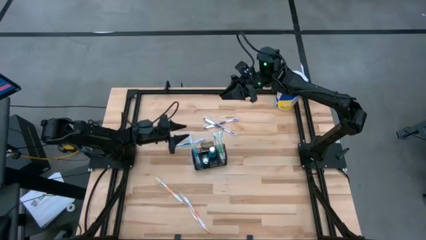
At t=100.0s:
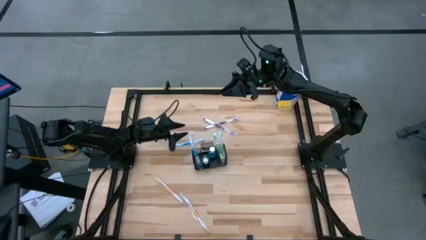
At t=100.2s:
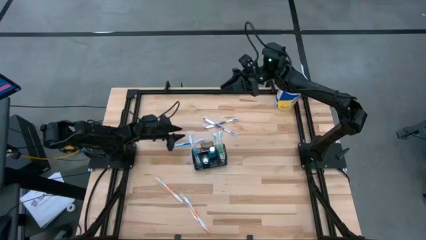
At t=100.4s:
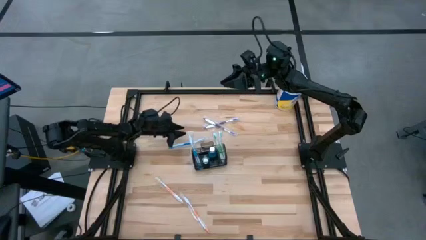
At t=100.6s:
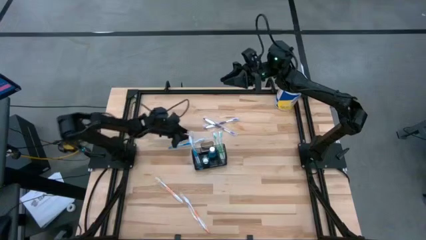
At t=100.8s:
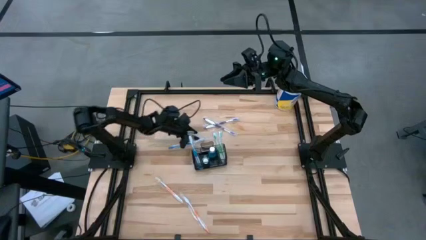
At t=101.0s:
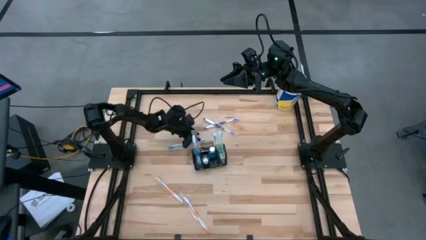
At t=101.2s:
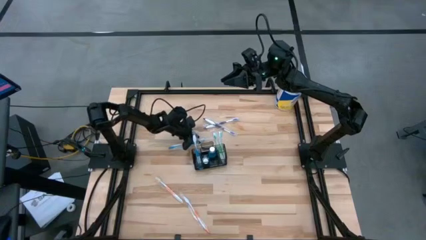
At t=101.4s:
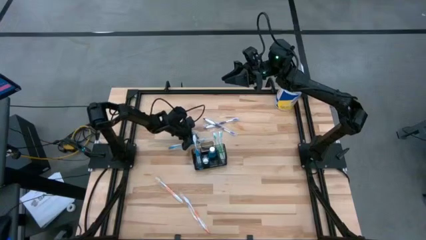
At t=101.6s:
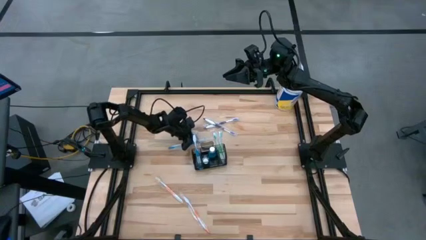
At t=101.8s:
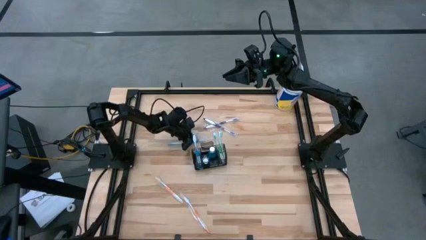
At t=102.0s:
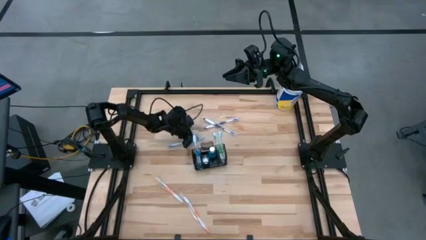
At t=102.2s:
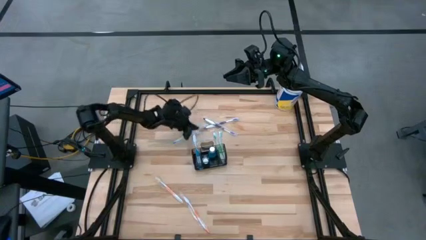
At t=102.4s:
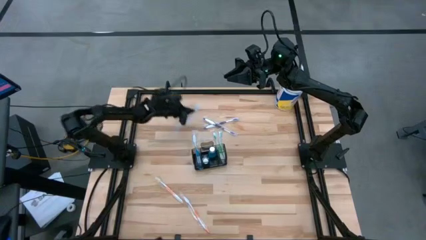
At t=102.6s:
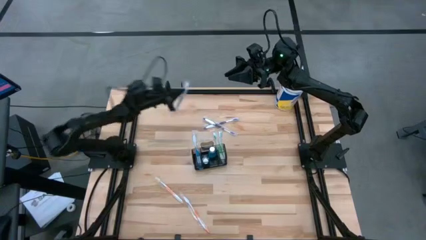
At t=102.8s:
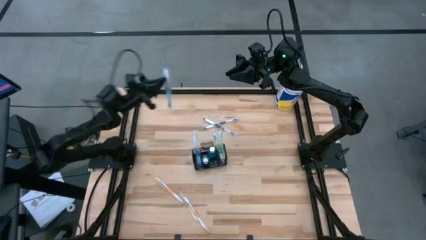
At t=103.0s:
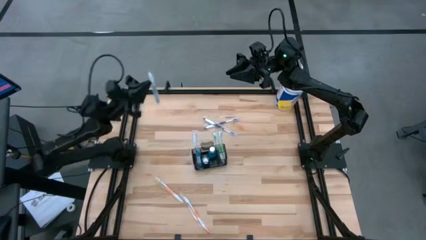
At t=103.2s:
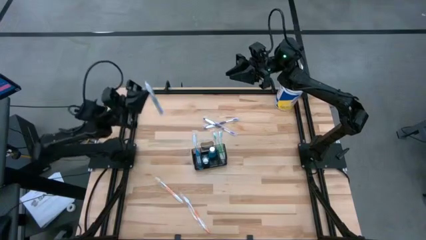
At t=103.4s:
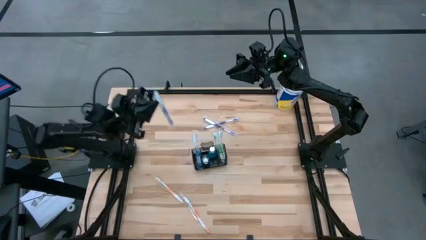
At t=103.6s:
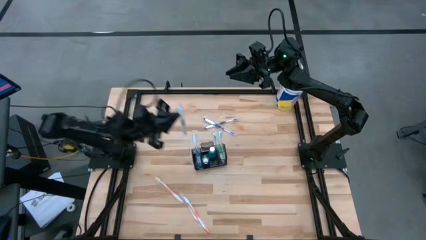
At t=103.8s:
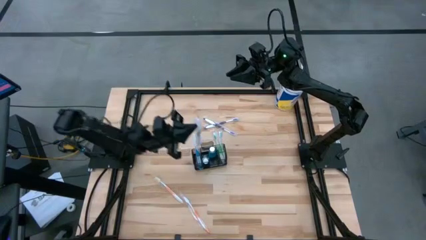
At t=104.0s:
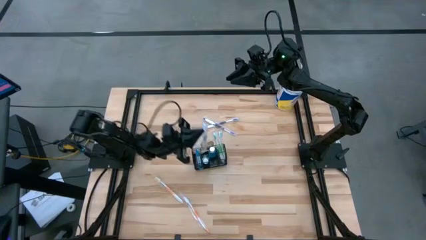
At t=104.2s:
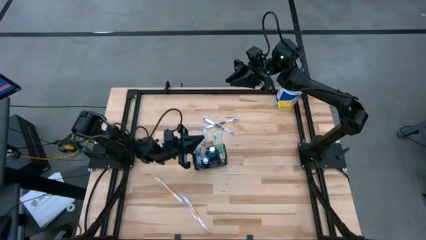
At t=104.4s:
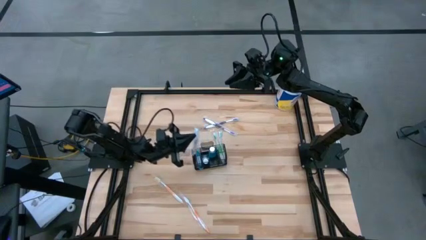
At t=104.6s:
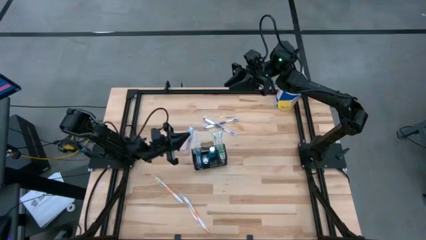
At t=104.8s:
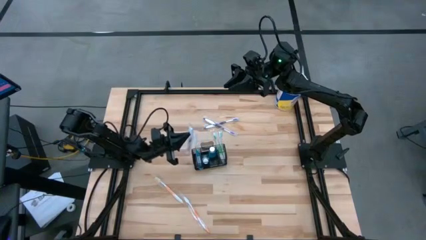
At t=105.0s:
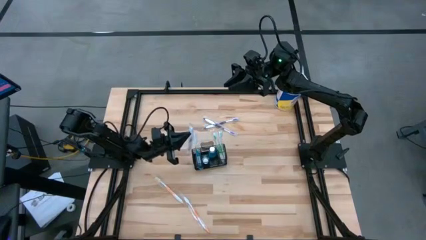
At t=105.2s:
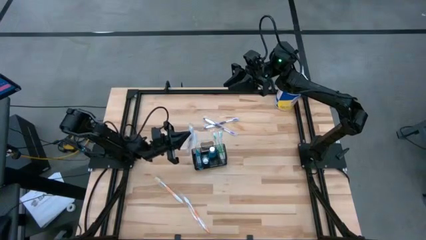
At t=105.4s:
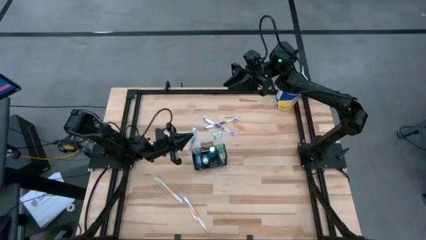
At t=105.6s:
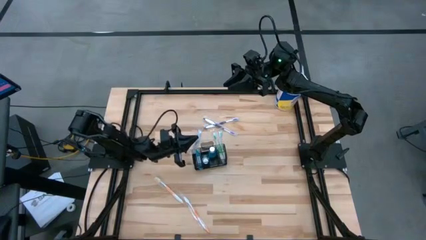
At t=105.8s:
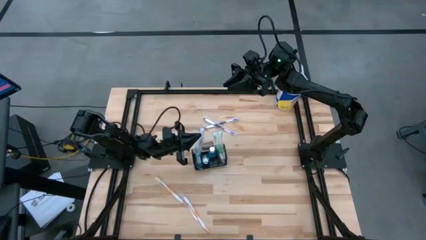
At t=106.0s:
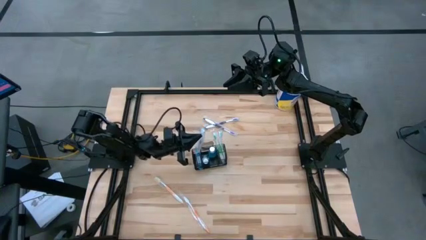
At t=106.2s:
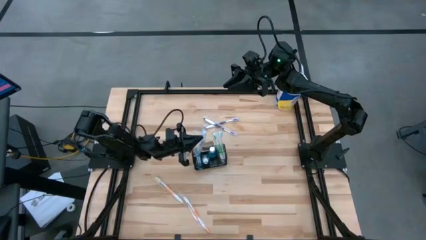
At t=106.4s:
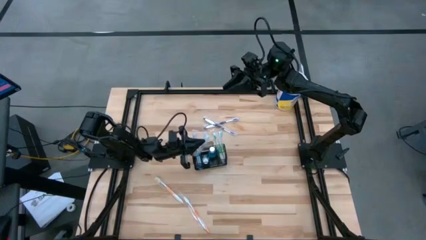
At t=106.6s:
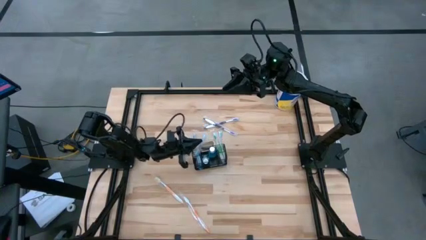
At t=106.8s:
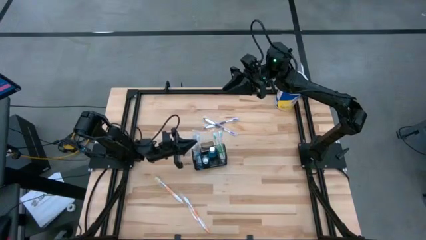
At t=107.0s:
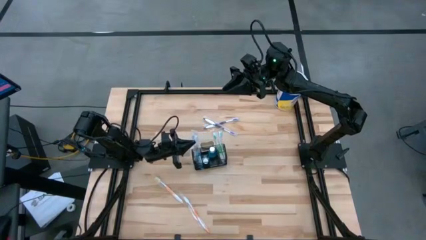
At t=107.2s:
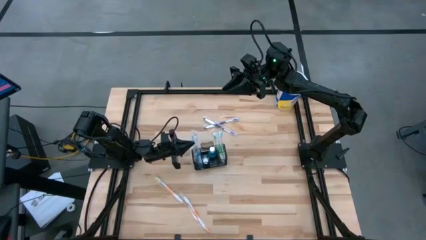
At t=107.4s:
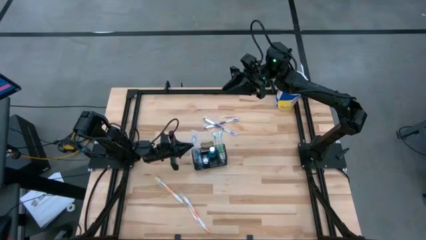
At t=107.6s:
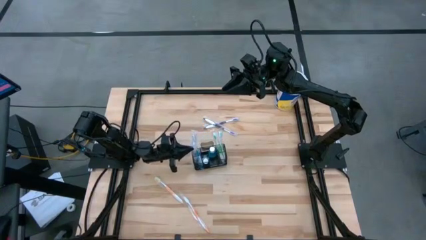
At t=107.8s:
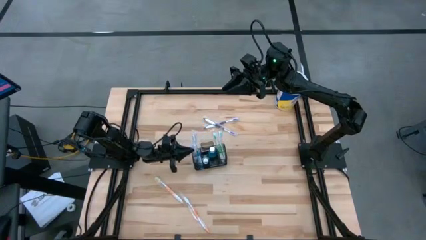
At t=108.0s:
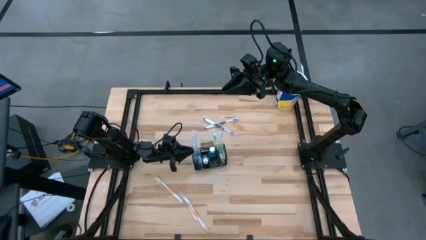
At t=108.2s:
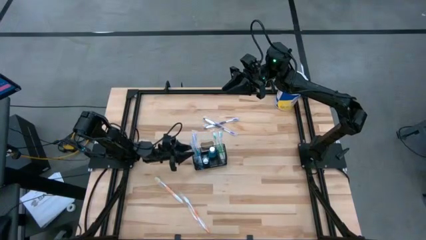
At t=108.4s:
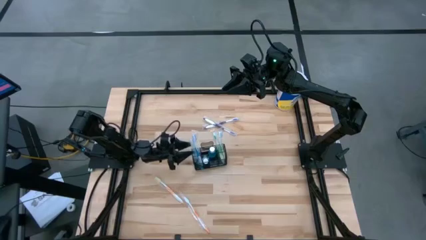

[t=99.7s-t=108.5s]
Task: Pick & Place toothbrushing station
Put the blue toothbrush into the mesh organizer

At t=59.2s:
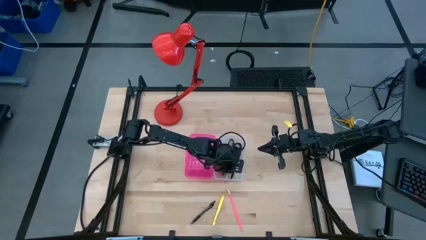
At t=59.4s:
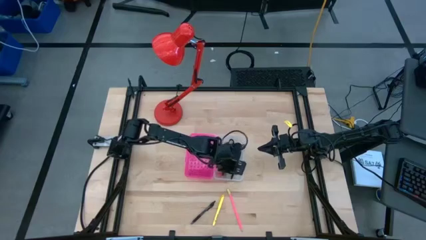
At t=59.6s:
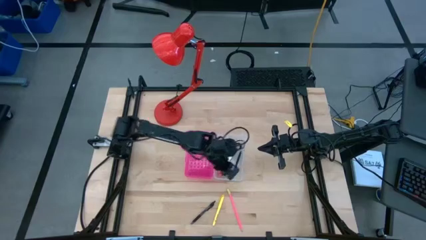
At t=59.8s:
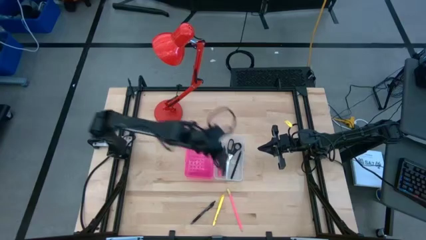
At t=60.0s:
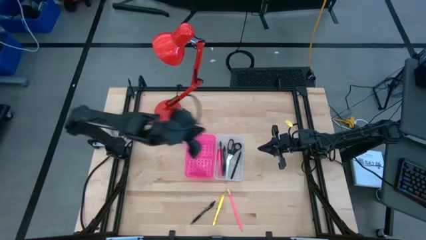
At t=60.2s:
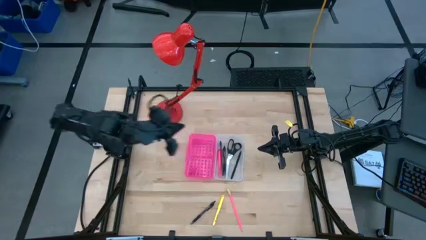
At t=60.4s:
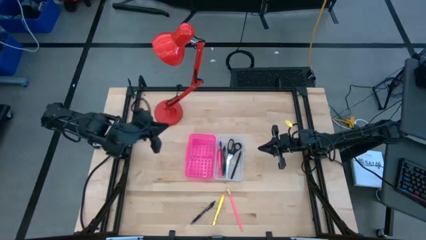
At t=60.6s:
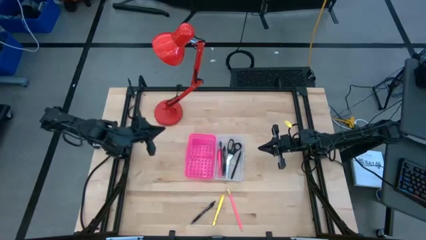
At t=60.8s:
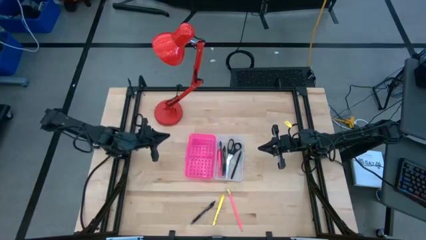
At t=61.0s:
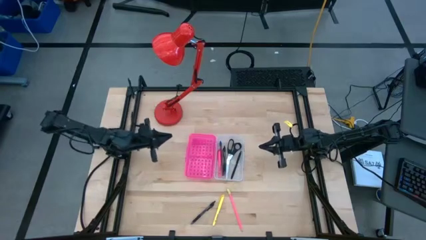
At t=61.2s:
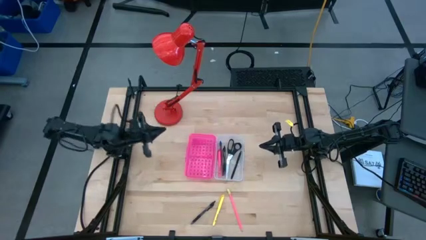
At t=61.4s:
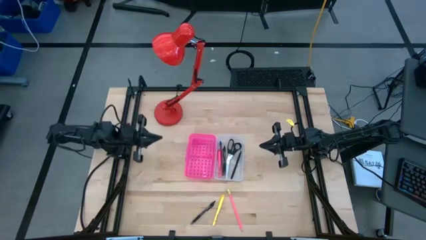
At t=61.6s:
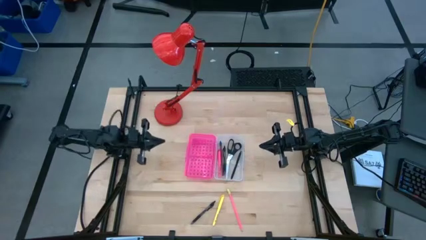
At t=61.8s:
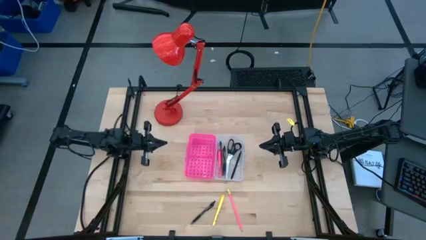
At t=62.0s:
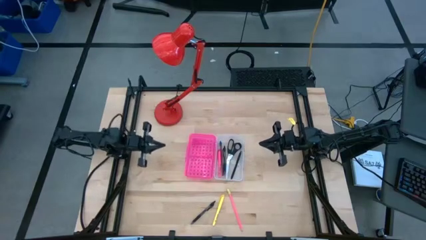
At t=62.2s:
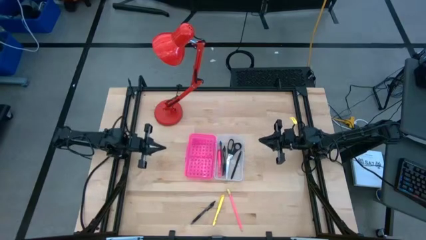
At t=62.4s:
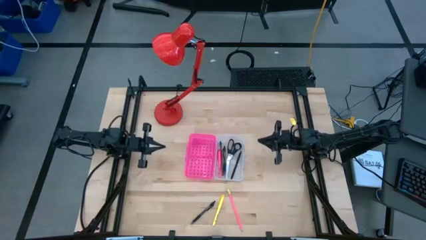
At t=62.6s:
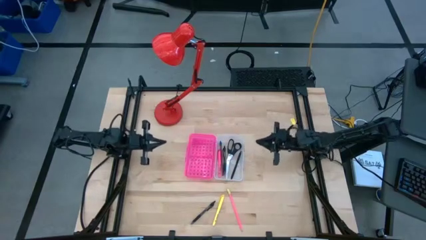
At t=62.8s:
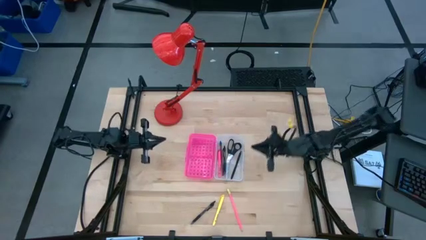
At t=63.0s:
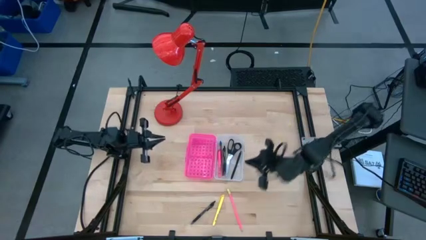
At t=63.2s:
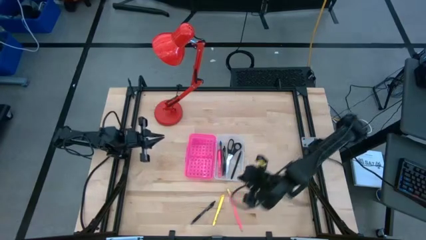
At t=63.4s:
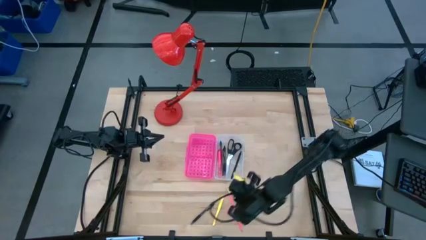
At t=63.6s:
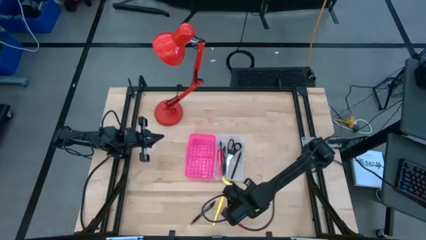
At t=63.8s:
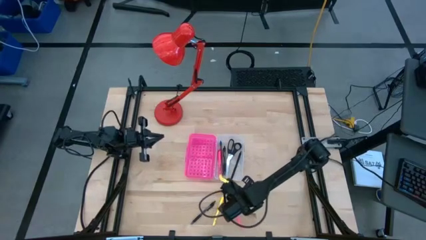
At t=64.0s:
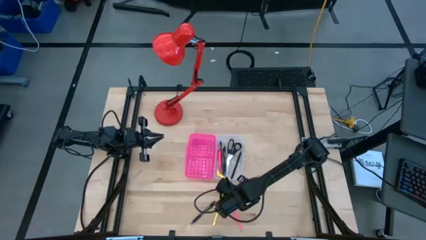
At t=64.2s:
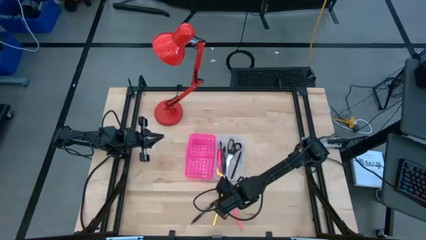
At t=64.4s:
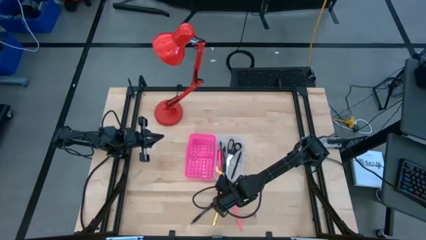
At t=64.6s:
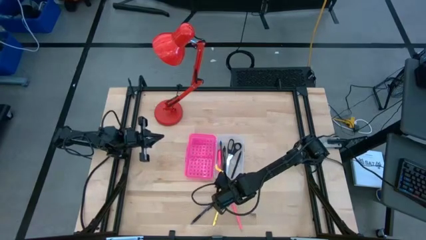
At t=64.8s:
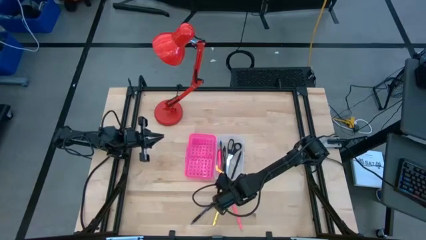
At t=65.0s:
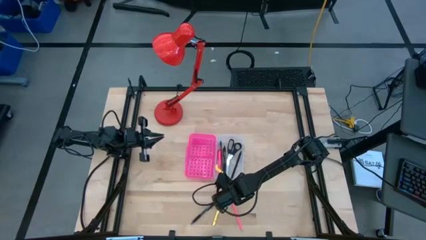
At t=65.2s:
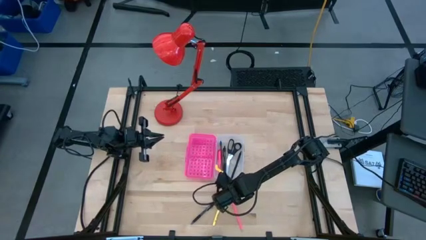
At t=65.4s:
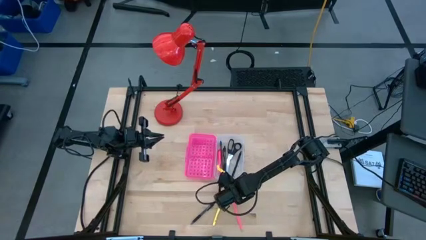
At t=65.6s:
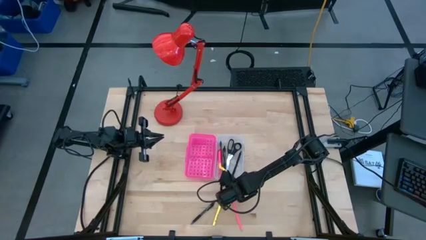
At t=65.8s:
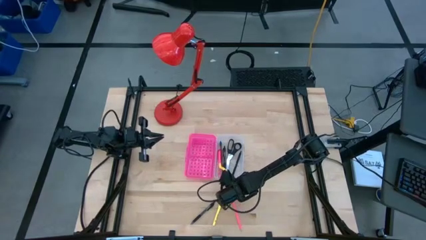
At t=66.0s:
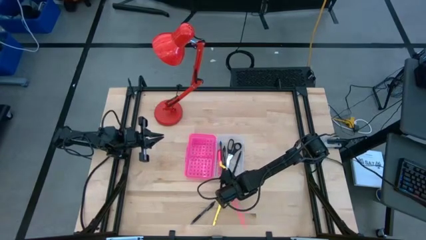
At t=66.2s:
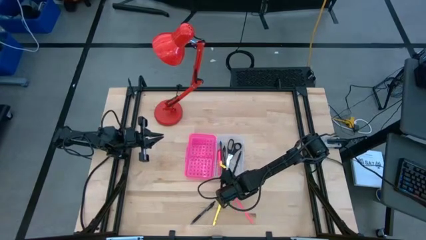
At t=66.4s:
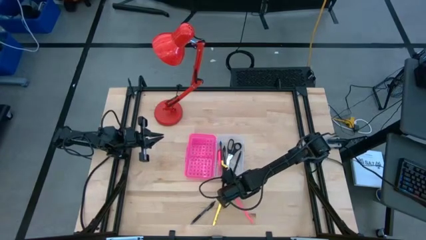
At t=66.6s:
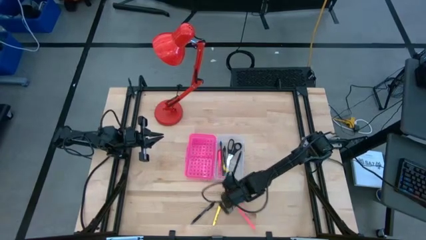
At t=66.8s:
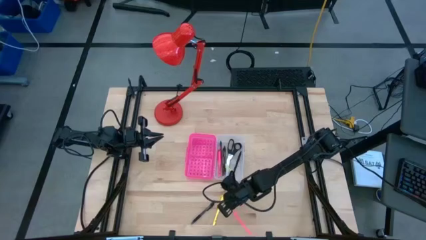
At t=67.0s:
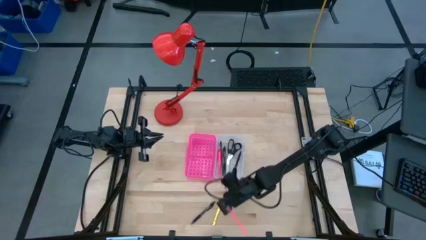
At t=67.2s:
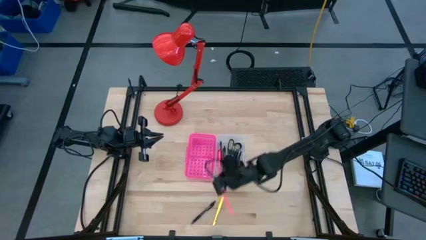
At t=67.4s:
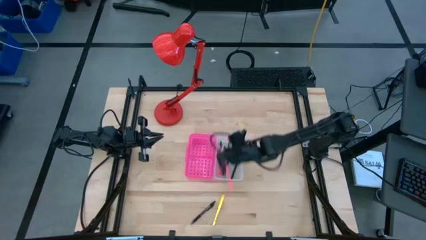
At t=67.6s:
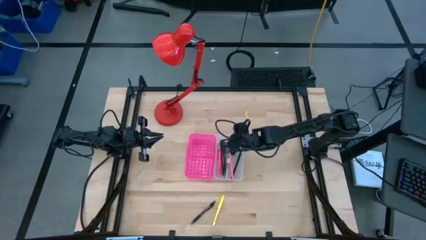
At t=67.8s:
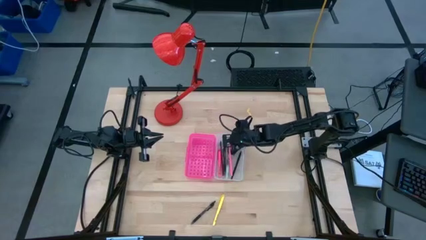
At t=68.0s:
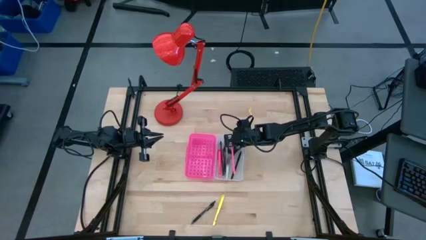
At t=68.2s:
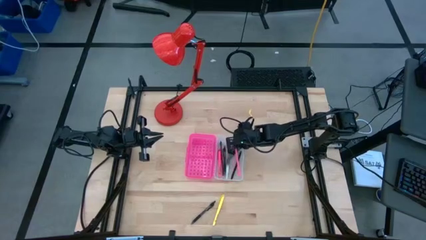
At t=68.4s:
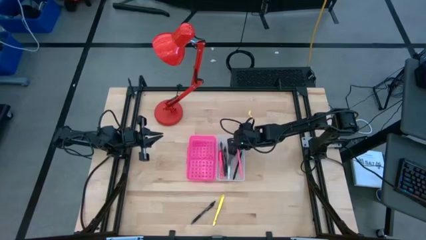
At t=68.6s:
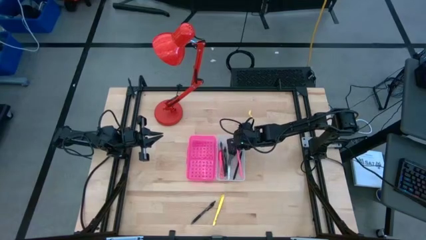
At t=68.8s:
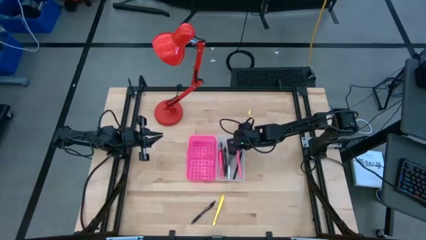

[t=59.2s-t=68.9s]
Task: Pick & place school supplies into a supply box
Put the pink supply in the pink box
